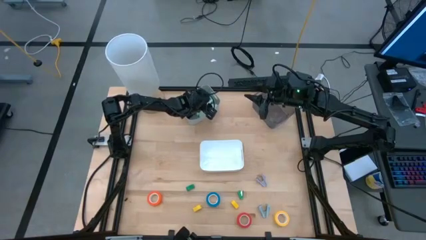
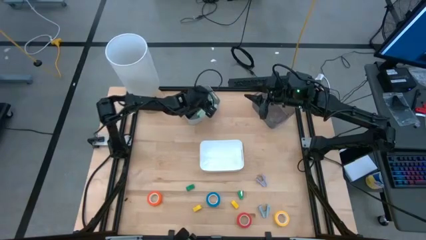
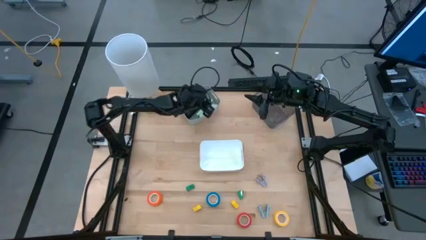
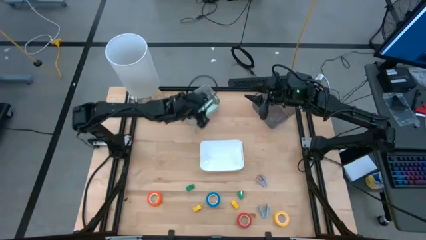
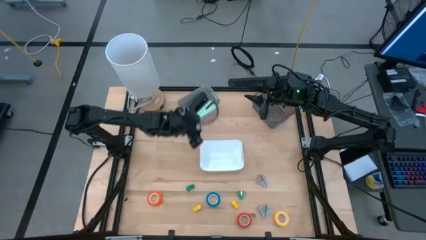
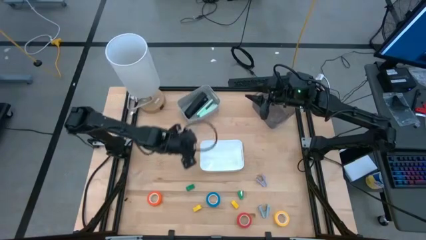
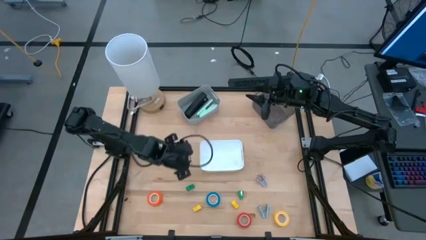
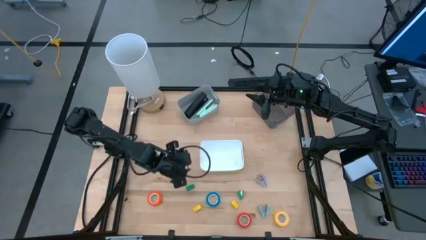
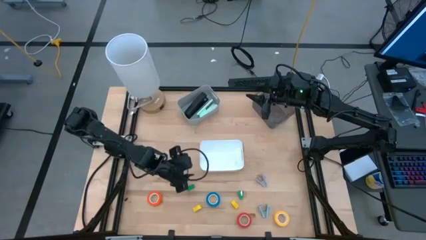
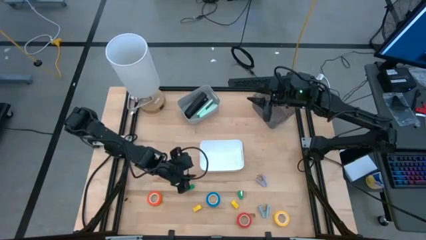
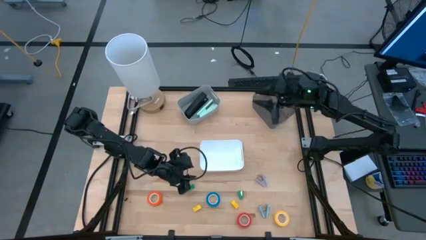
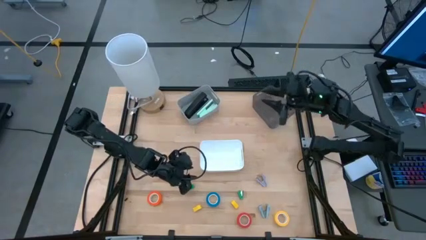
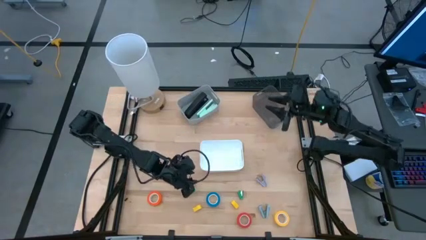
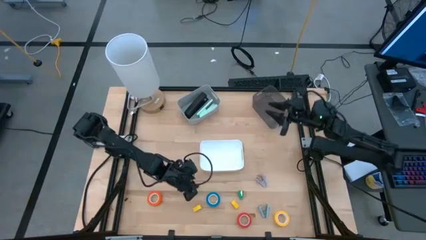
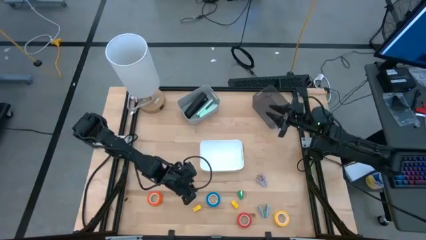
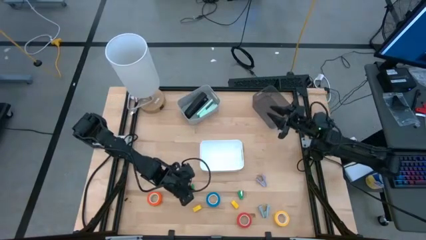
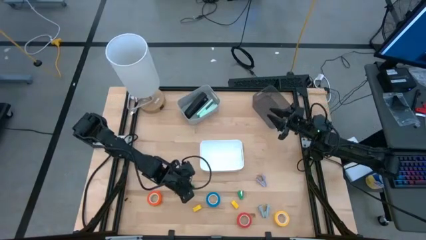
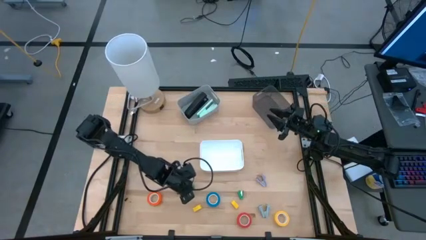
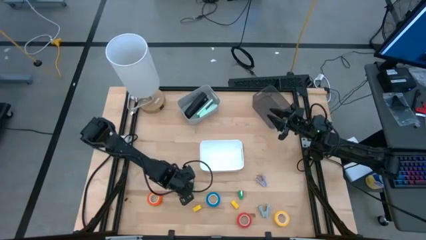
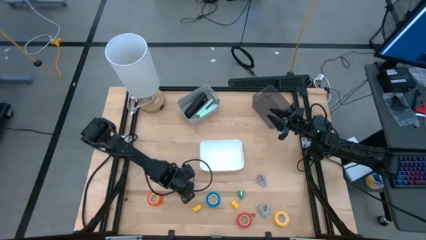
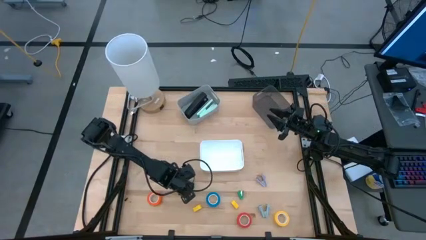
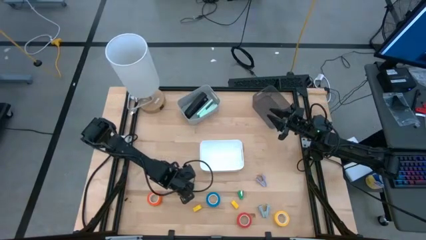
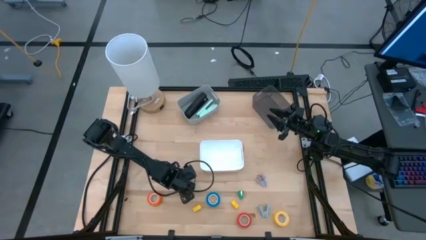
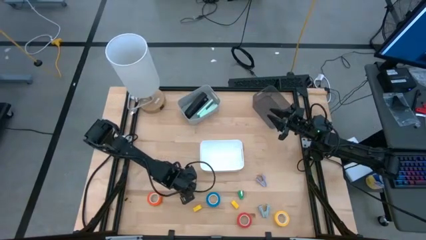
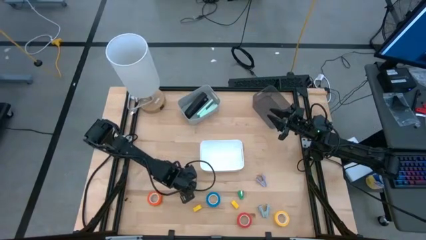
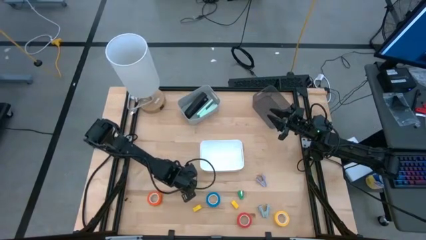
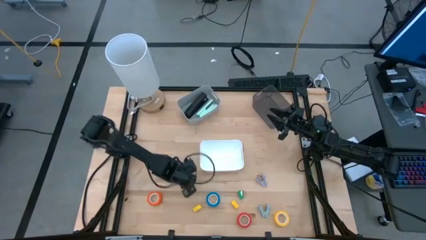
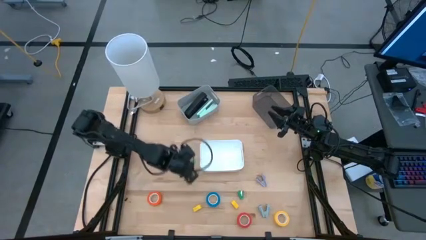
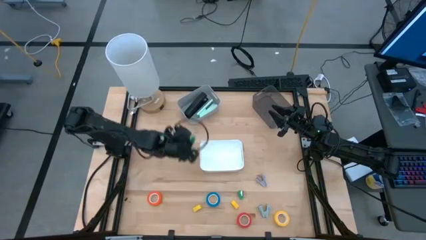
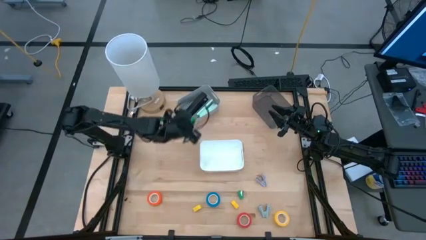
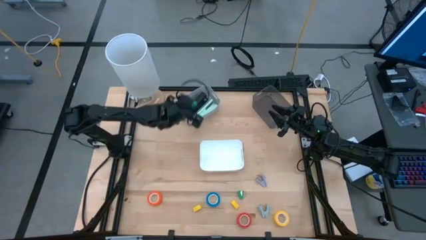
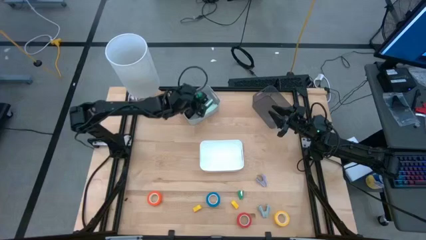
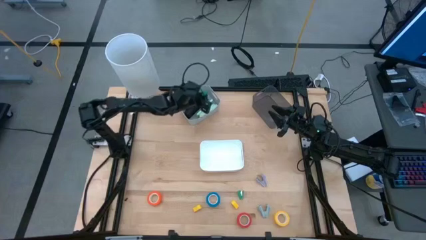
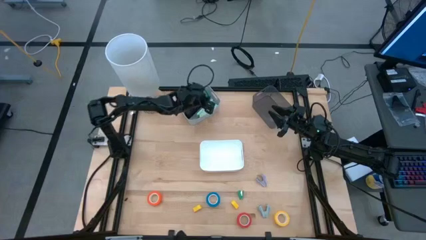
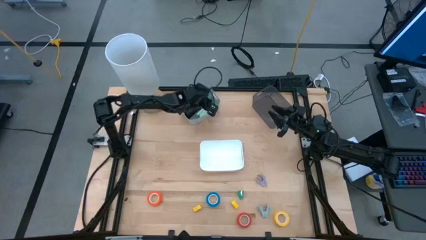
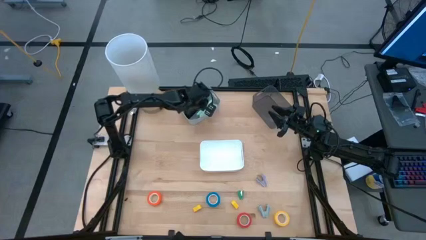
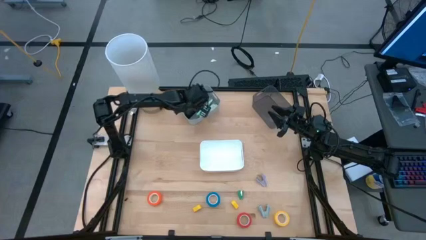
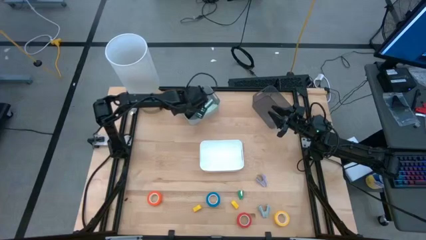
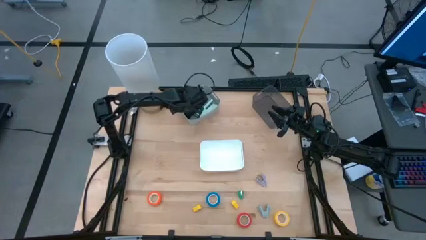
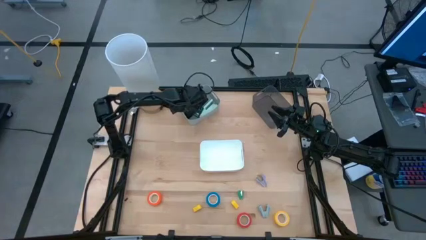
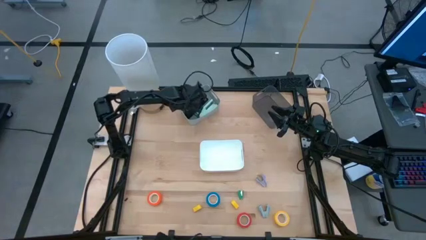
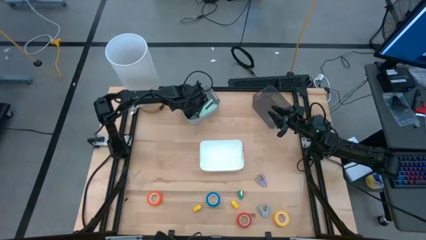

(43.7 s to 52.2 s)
Task: Pick and place Stapler, Stapler remover, tape
Put the left green stapler into the gray bin

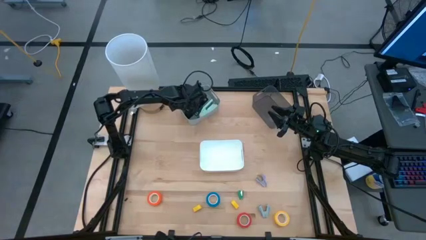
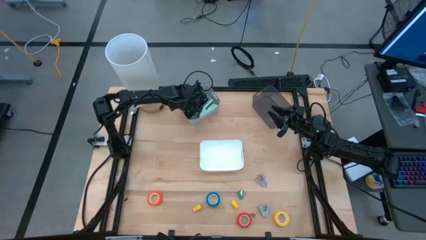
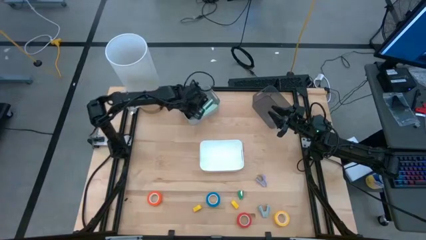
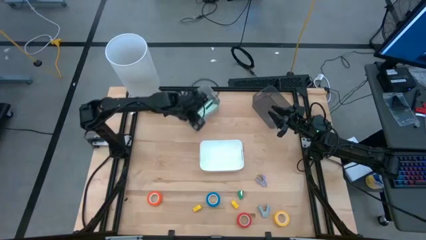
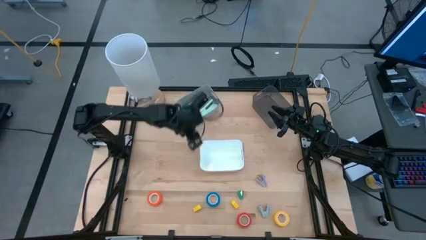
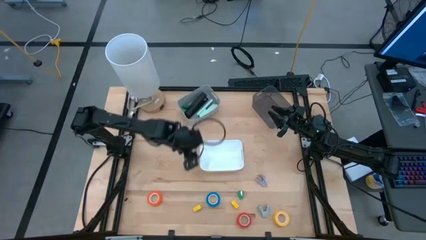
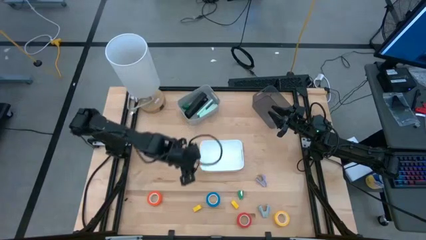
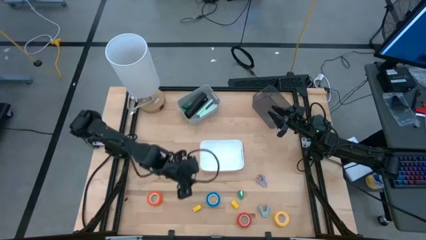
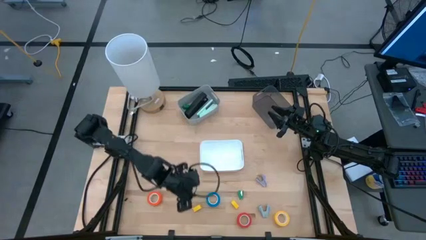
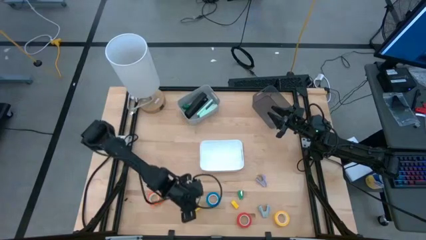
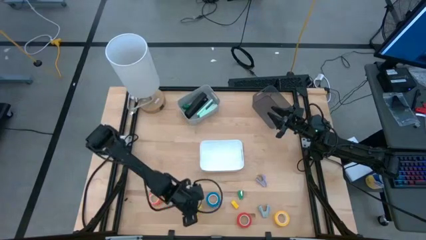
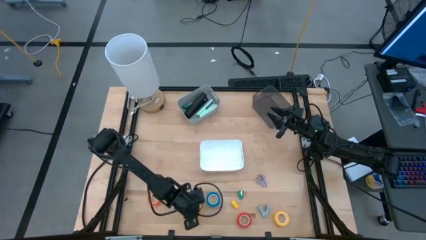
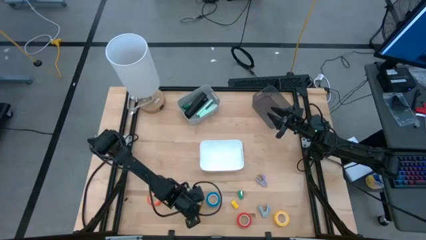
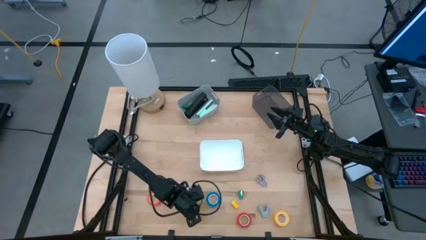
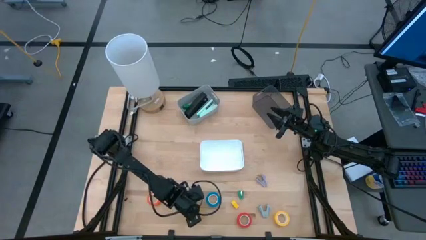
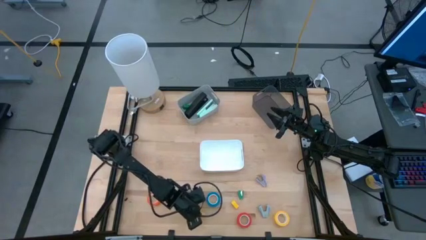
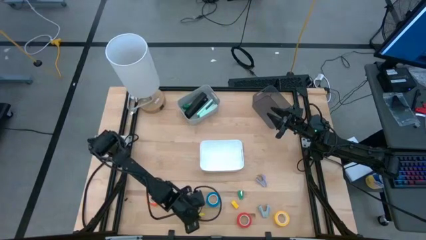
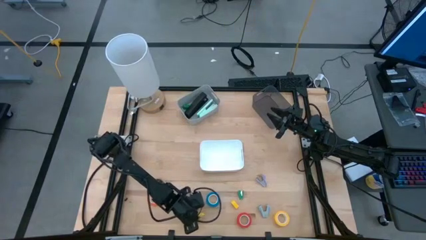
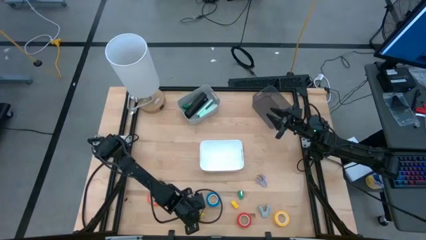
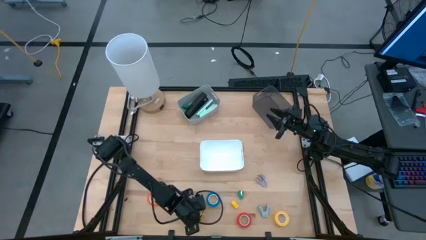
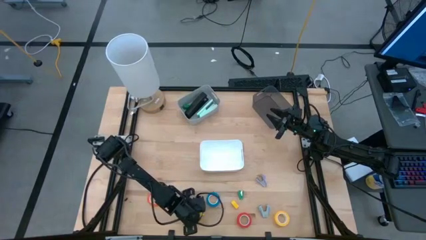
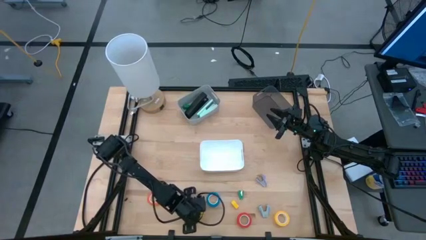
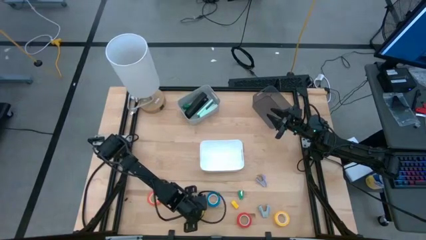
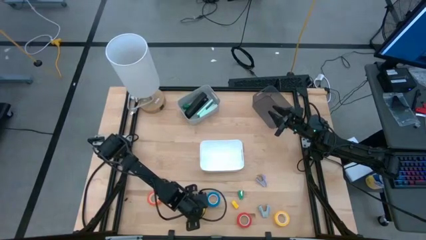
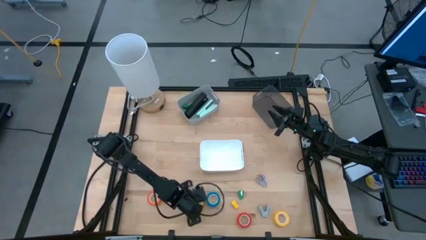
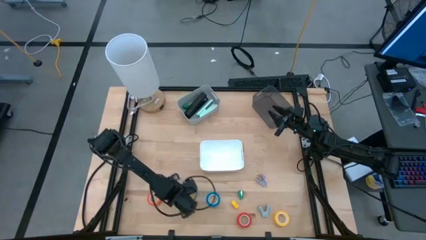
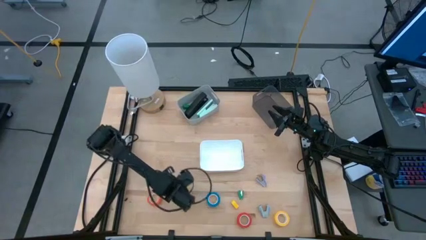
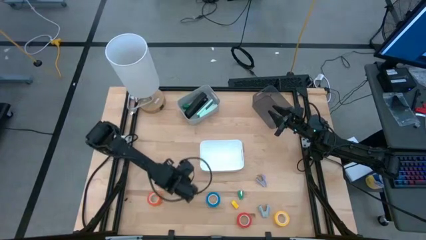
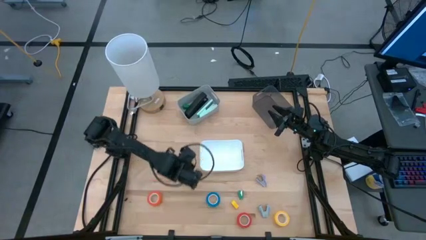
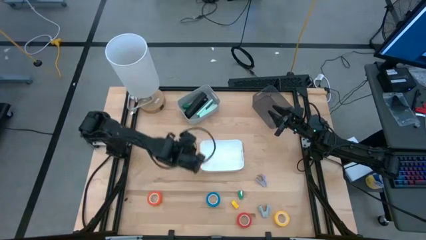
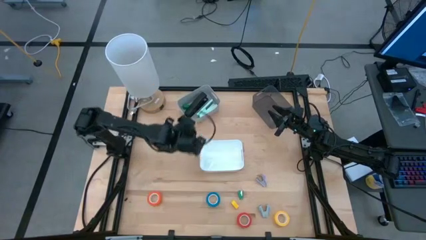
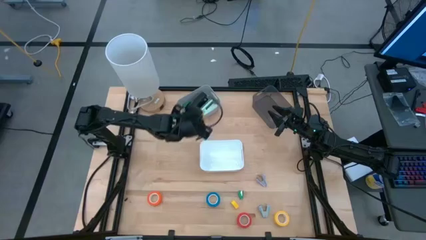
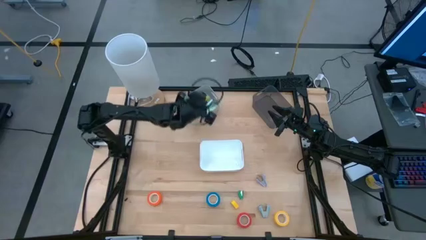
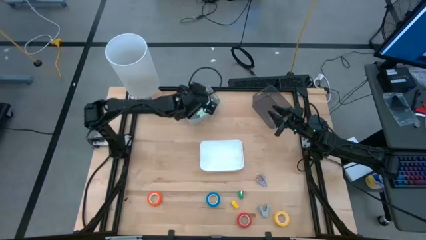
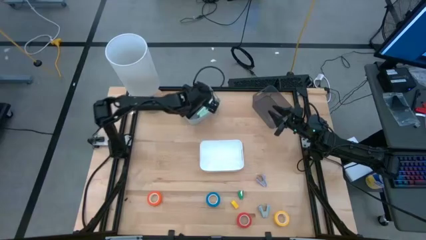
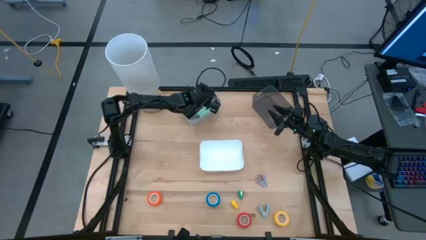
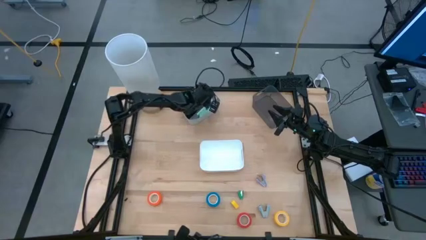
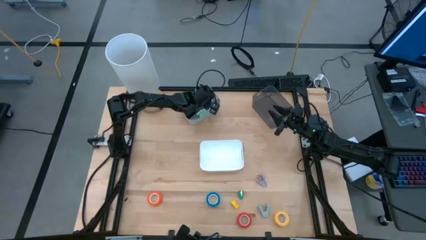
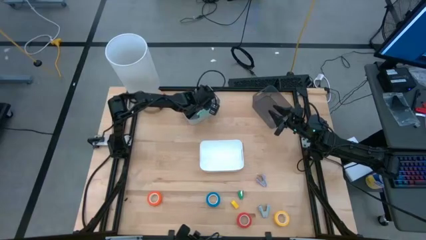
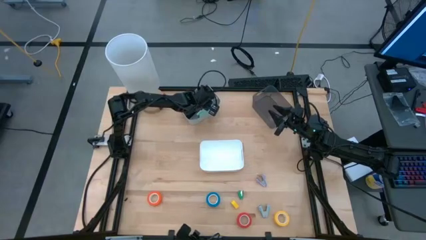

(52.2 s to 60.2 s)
Put the left yellow stapler into the gray bin
